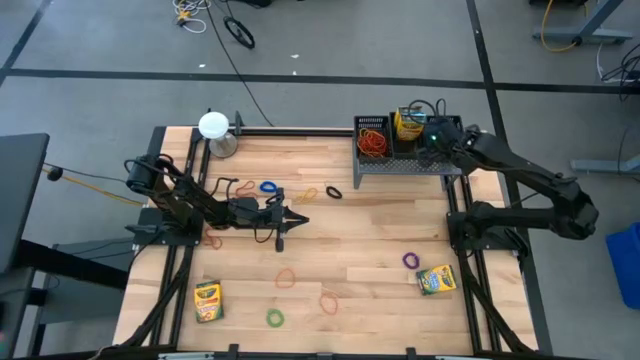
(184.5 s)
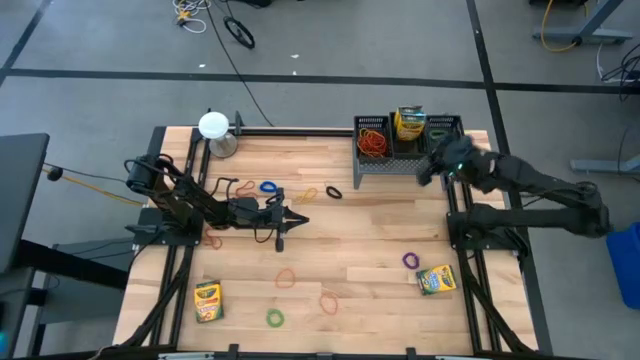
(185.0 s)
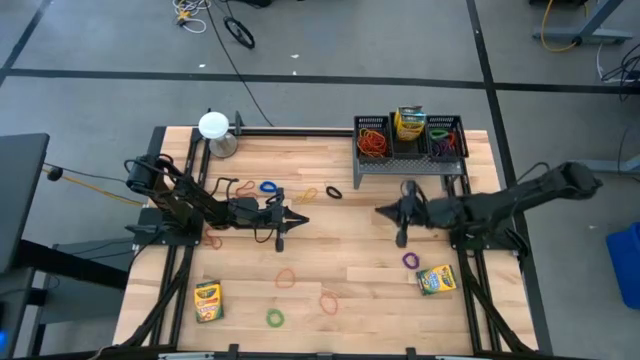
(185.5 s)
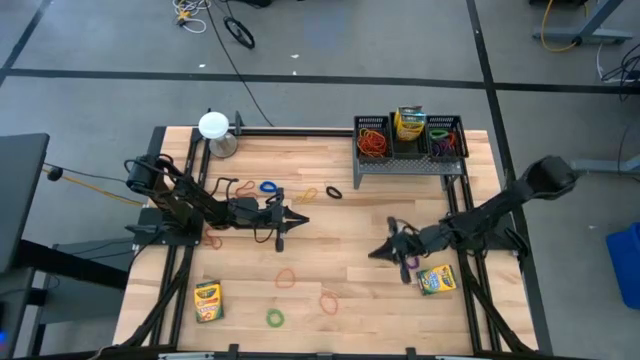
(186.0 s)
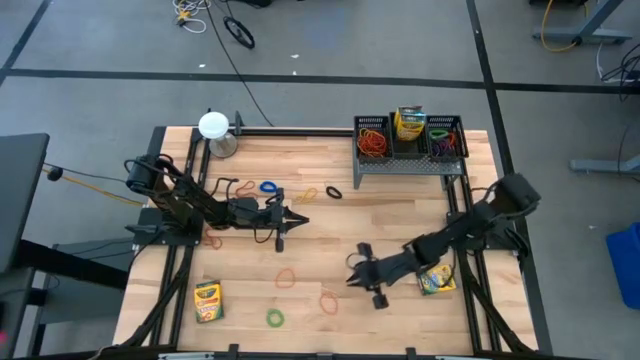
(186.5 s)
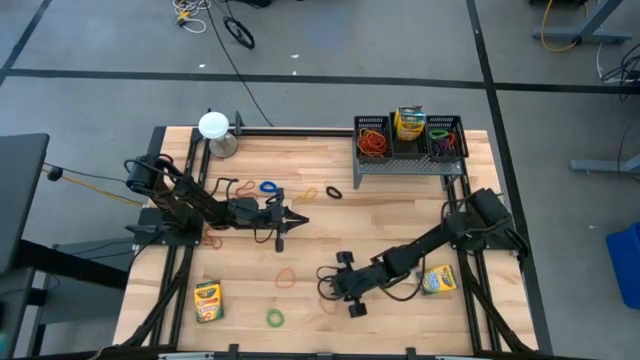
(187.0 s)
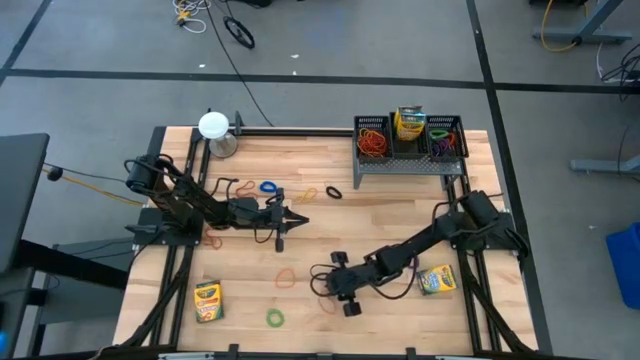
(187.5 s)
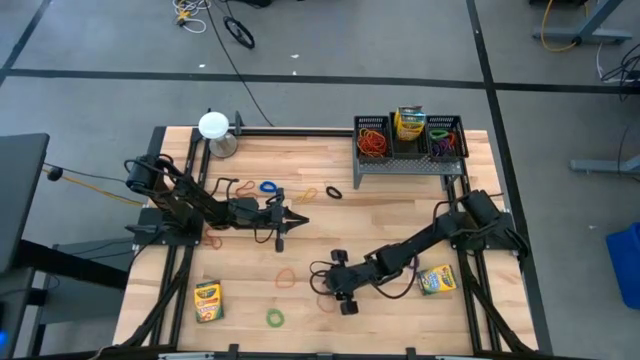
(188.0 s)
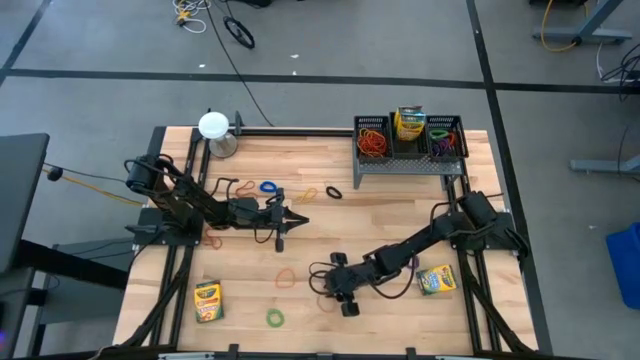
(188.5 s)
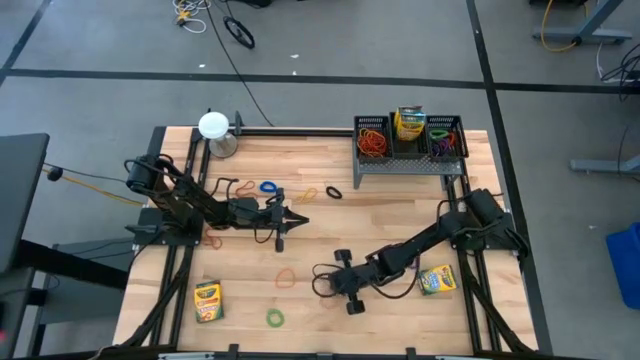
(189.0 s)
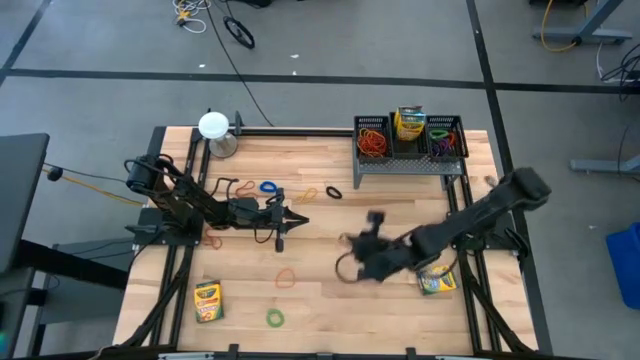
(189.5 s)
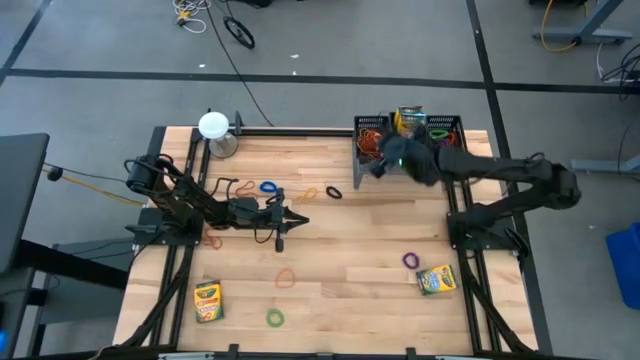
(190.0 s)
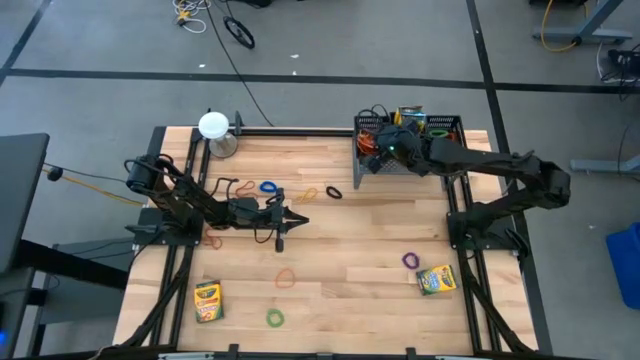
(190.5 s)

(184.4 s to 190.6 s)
Task: Pick & Place Office Desk Supplies
Put the orange rubber band into the left black bin on the shelf

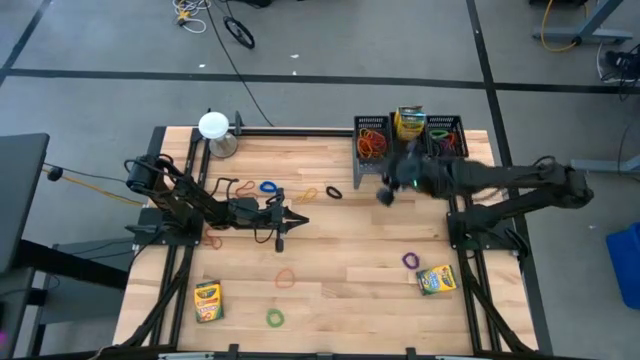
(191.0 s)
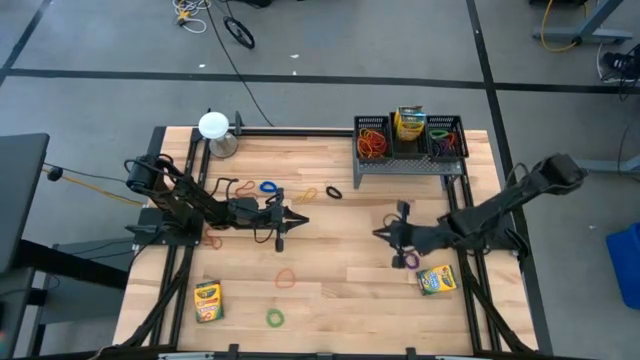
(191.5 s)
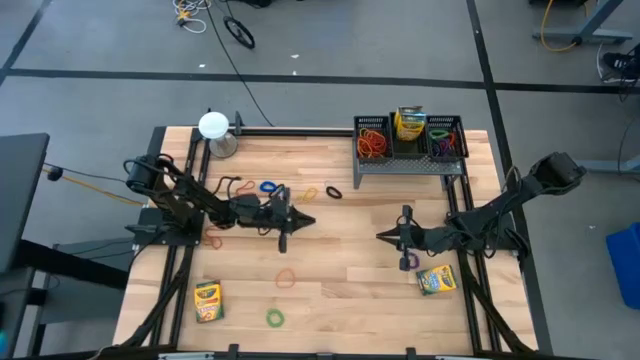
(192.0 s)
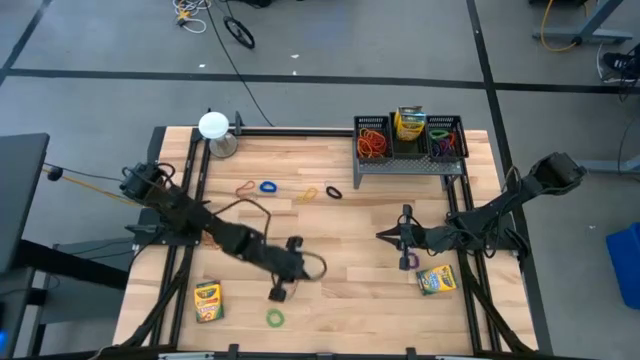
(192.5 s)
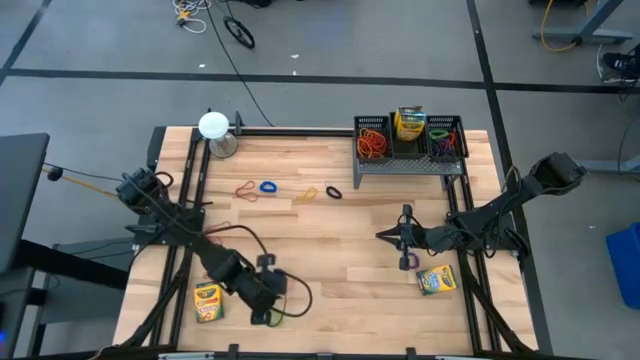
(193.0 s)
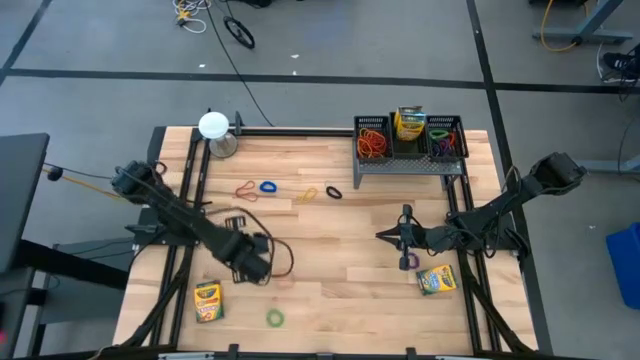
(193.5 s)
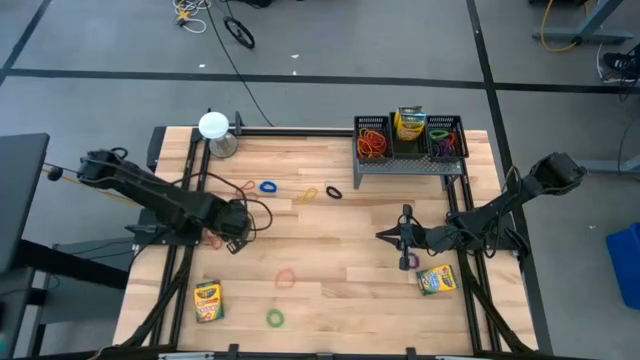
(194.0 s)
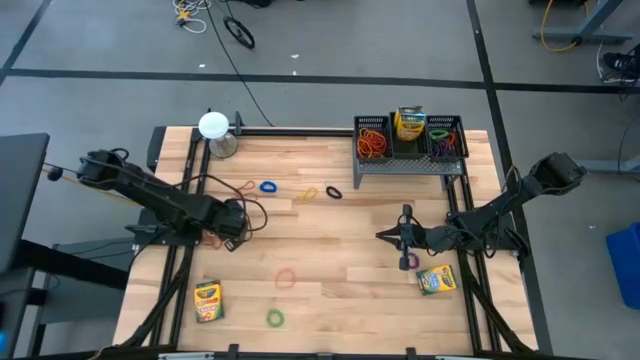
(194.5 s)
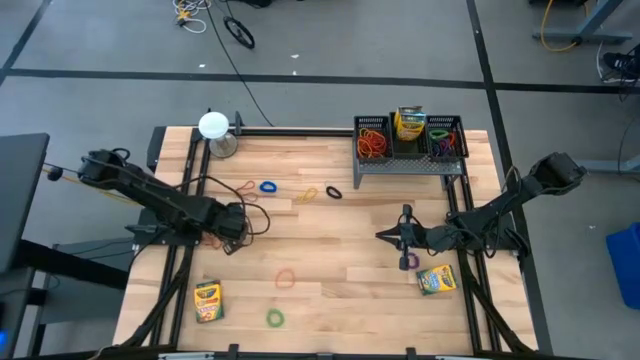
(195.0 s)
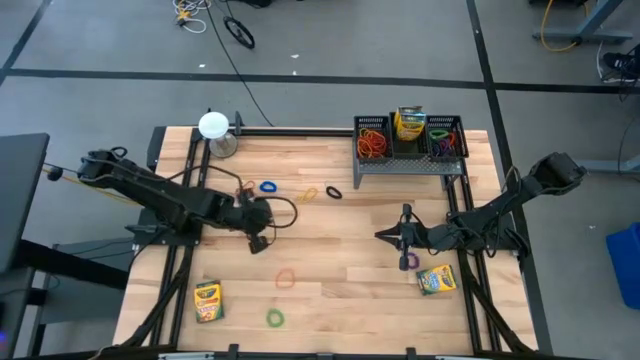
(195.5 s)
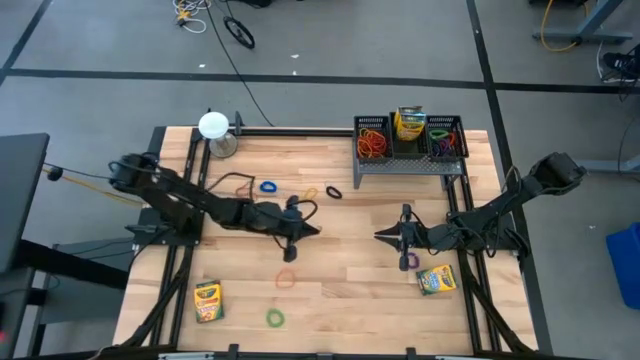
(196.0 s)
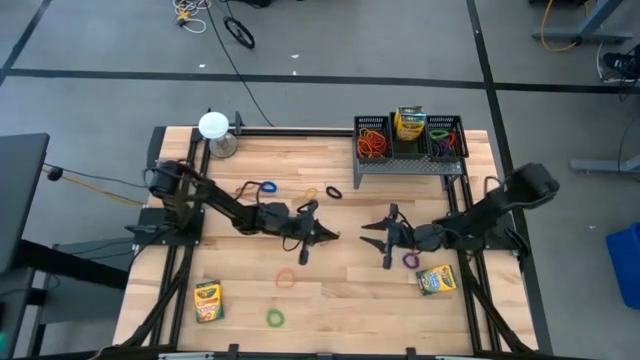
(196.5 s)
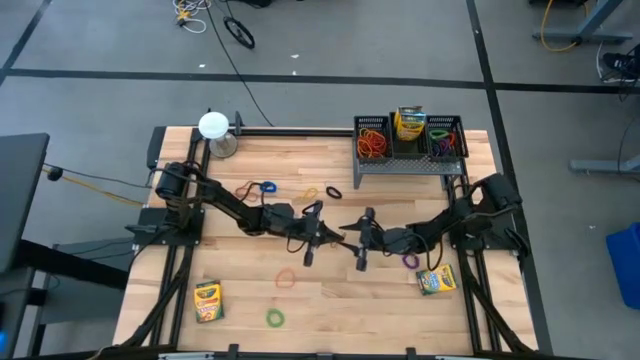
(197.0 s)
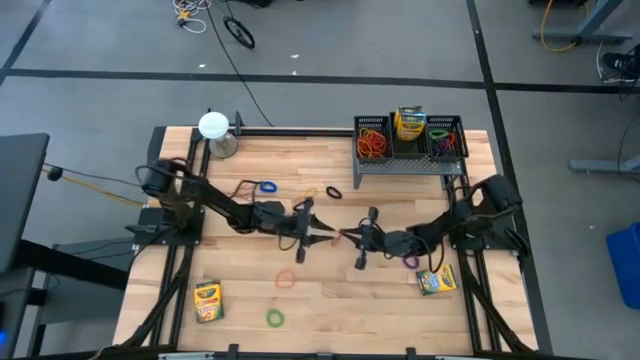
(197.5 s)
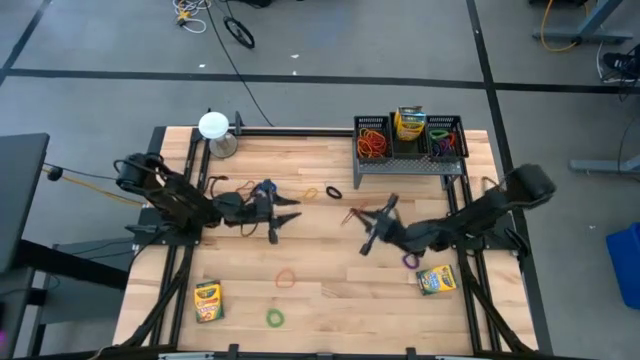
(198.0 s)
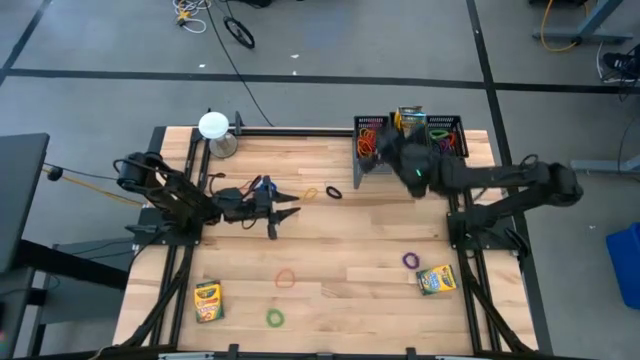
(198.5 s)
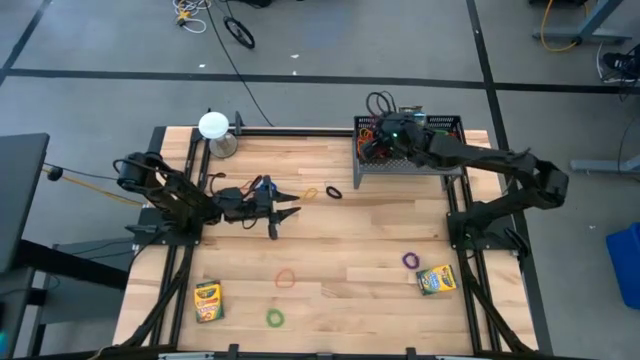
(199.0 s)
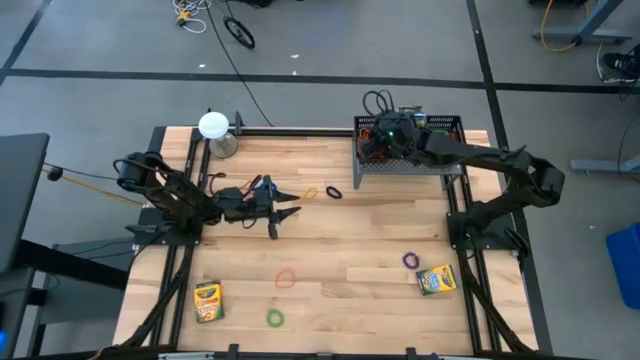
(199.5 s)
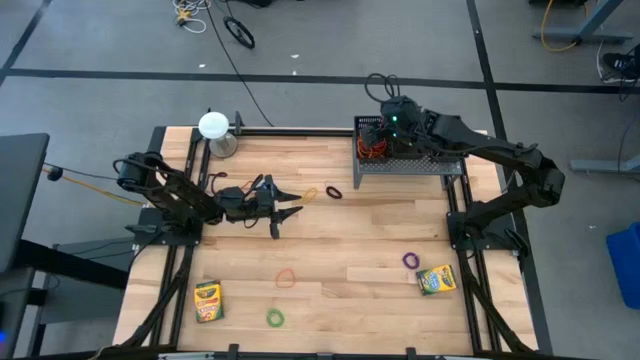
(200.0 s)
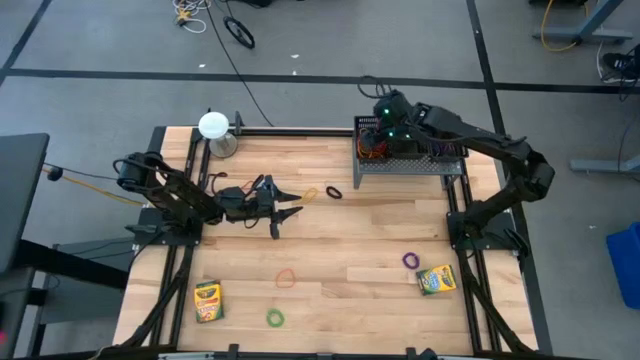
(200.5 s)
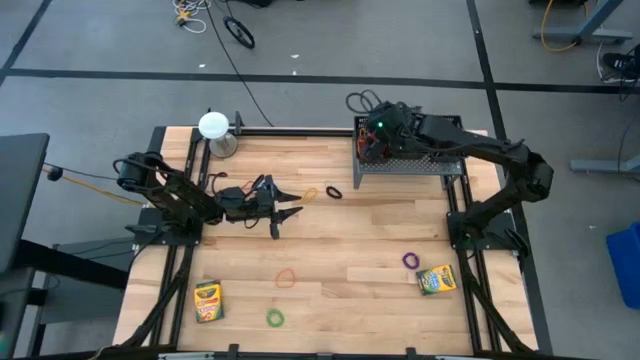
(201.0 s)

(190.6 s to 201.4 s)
Put the red rubber band into the left black bin on the shelf

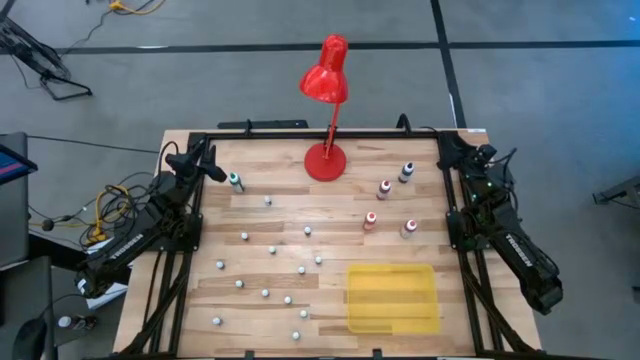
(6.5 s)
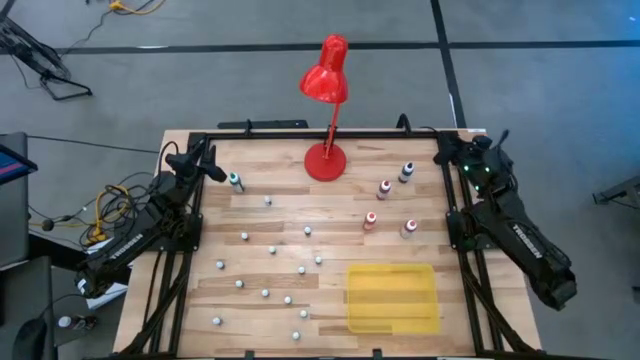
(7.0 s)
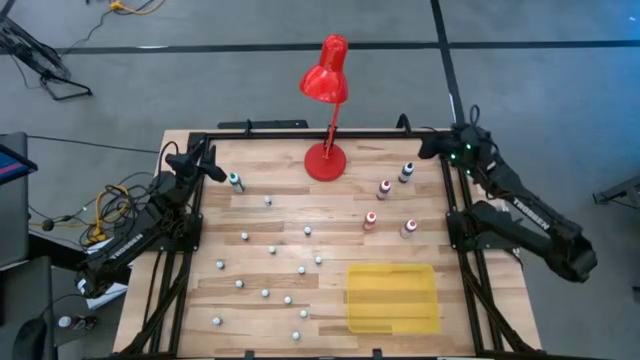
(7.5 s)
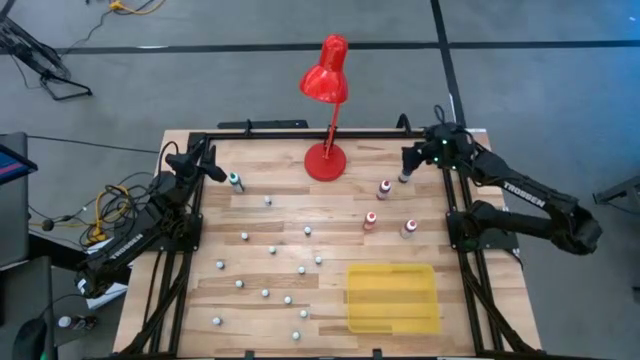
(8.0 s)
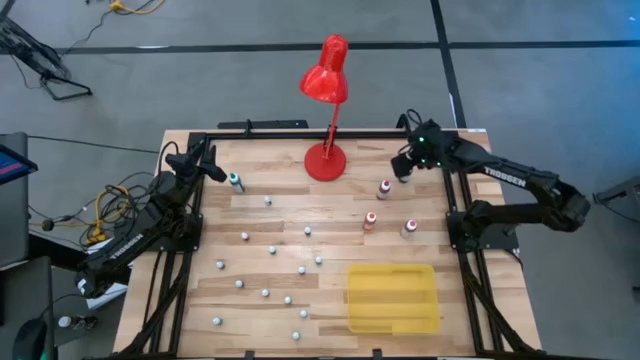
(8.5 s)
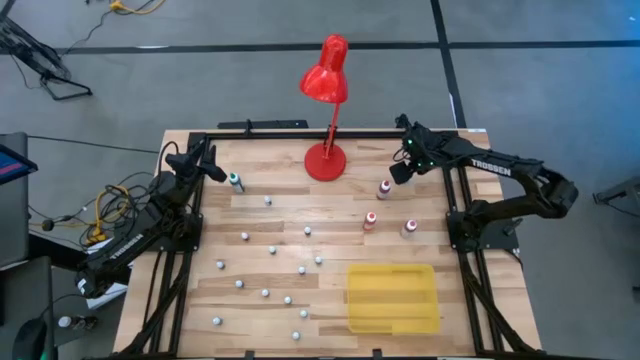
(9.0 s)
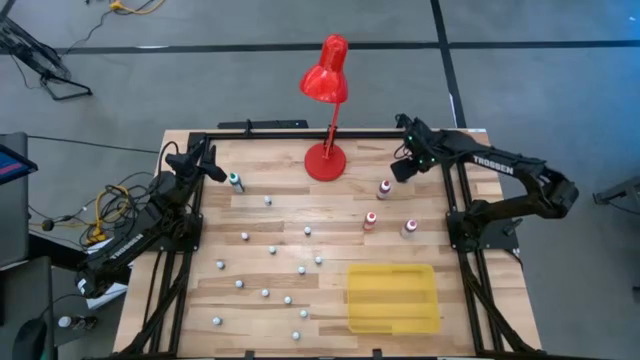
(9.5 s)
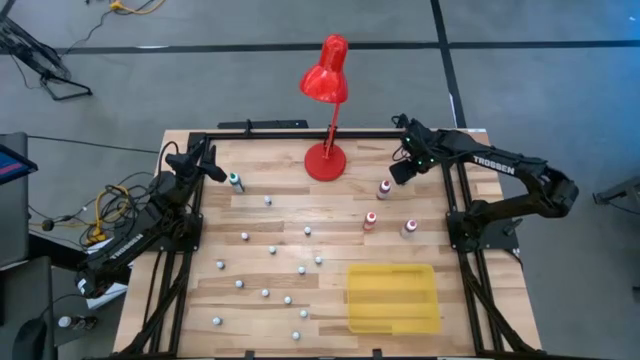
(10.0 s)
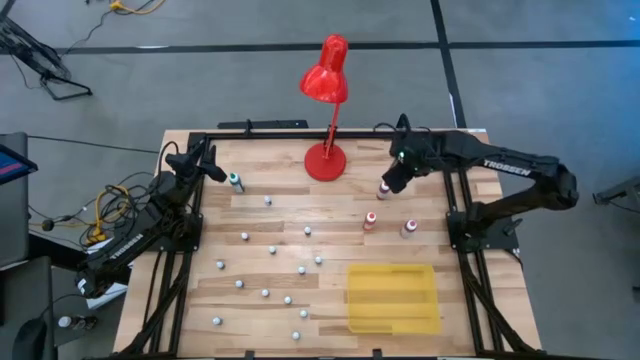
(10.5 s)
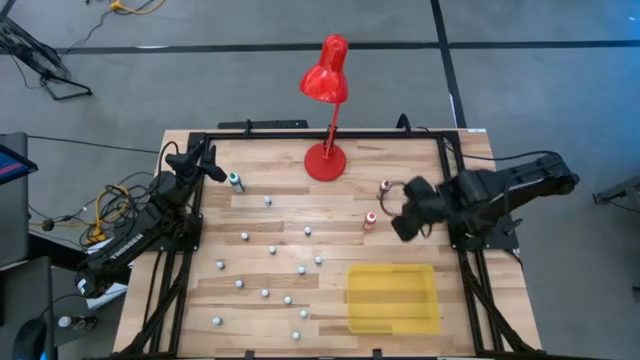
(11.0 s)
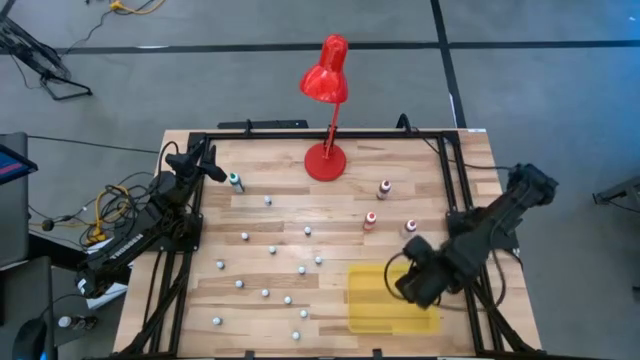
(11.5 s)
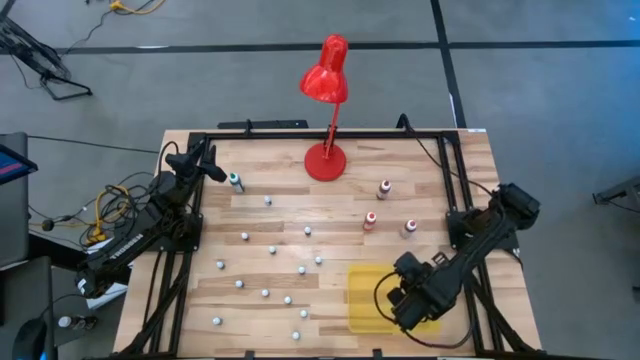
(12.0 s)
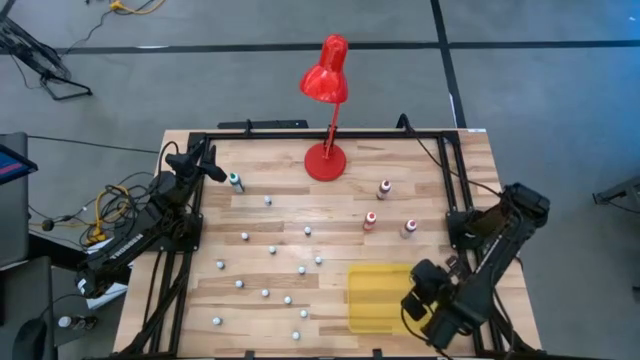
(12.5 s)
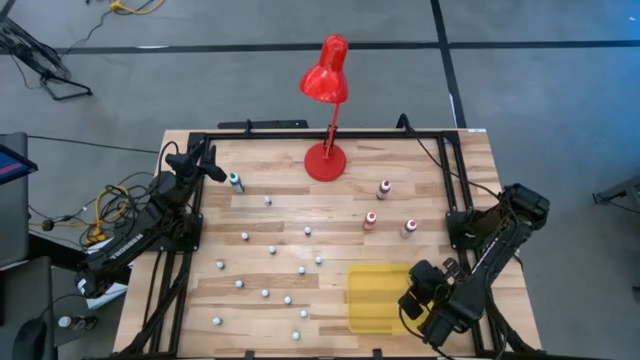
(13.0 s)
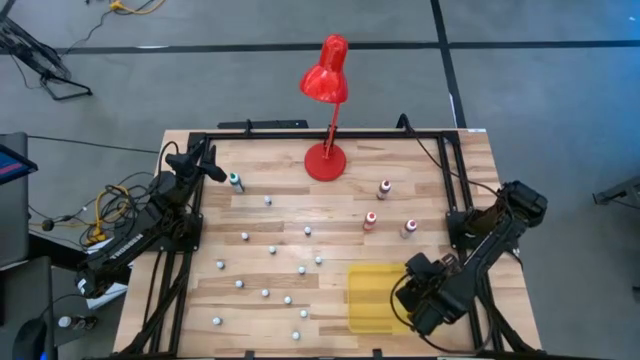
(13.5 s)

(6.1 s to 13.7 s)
Task: Pick & Place food coloring
Put the large black food coloring into the yellow bin
